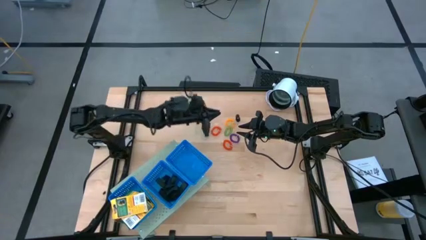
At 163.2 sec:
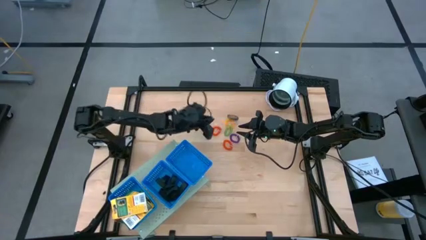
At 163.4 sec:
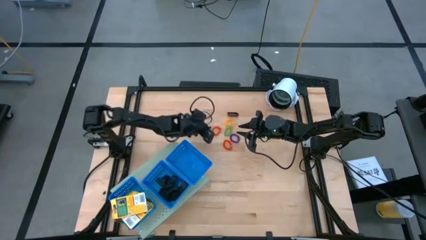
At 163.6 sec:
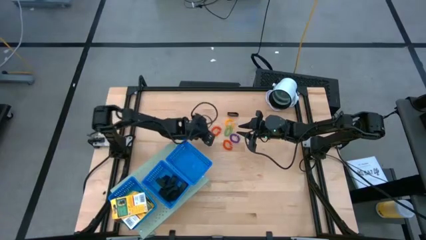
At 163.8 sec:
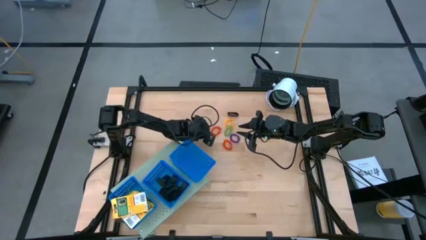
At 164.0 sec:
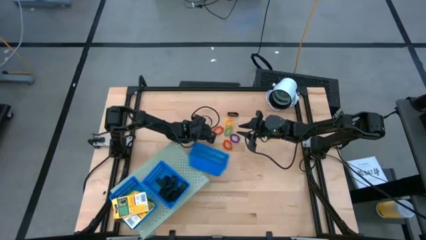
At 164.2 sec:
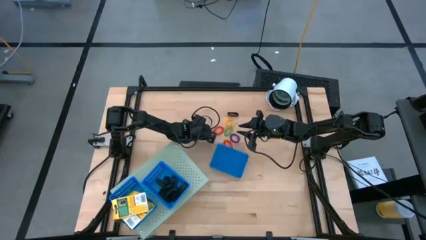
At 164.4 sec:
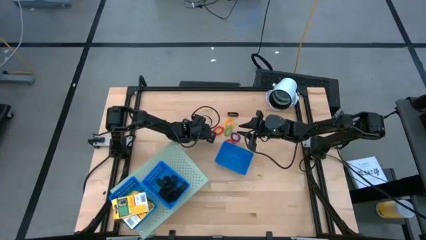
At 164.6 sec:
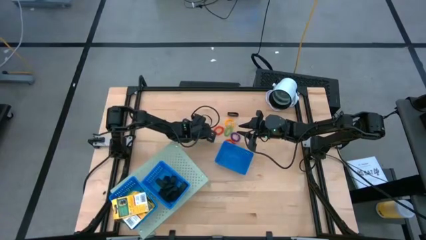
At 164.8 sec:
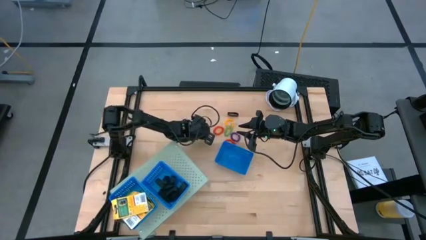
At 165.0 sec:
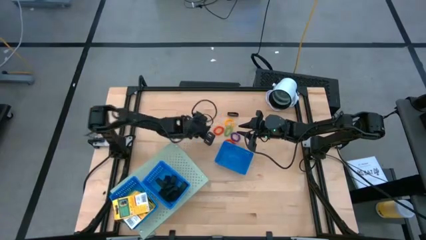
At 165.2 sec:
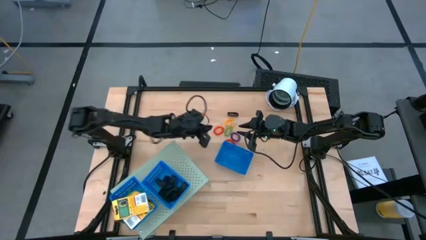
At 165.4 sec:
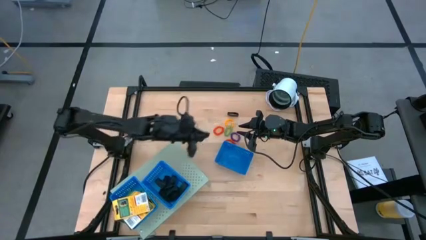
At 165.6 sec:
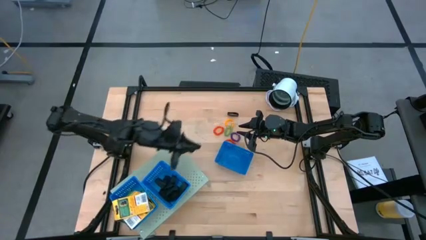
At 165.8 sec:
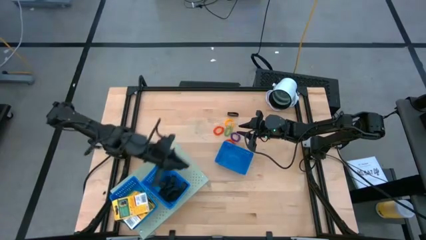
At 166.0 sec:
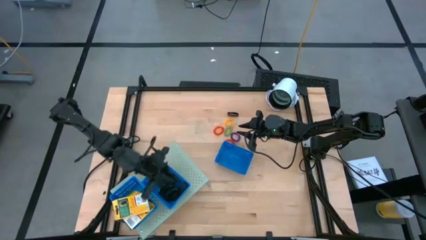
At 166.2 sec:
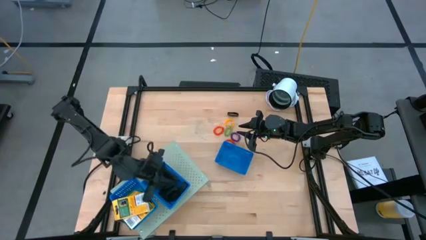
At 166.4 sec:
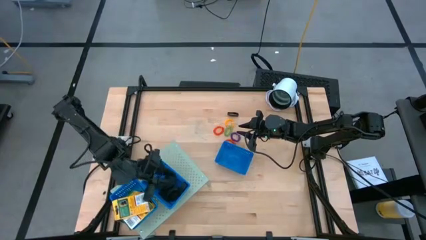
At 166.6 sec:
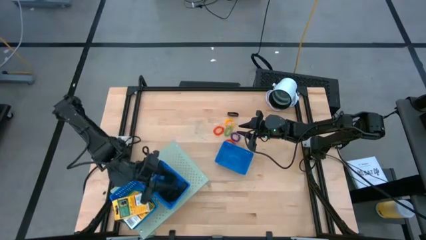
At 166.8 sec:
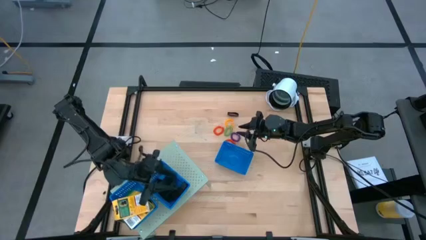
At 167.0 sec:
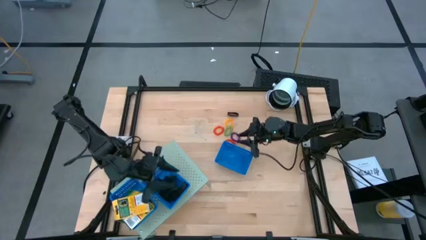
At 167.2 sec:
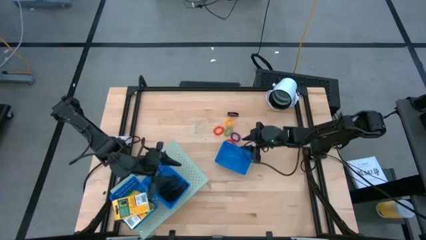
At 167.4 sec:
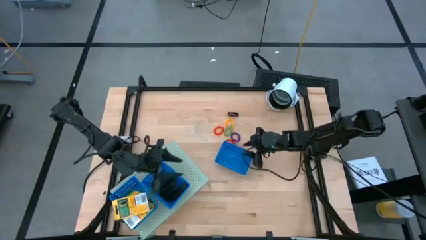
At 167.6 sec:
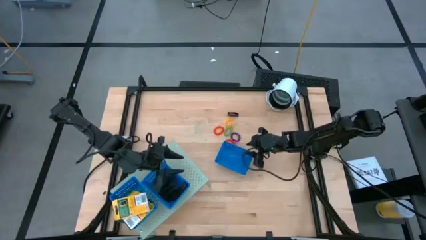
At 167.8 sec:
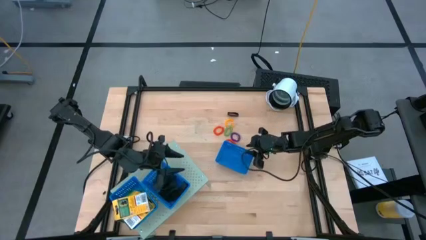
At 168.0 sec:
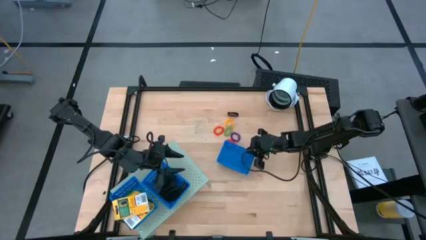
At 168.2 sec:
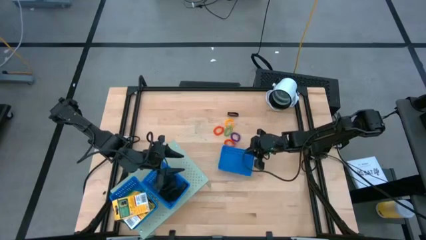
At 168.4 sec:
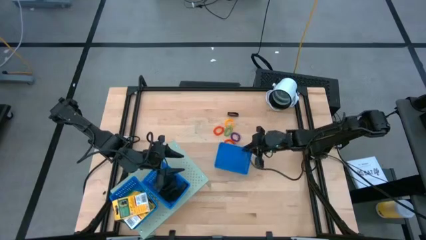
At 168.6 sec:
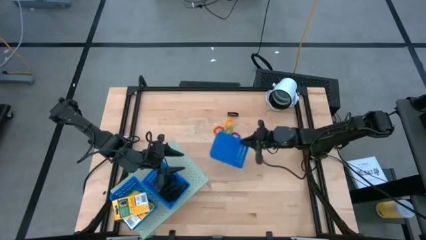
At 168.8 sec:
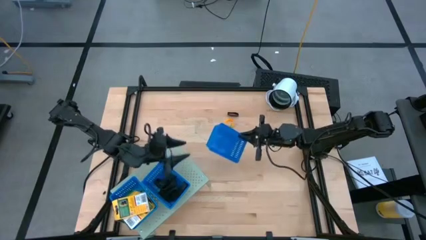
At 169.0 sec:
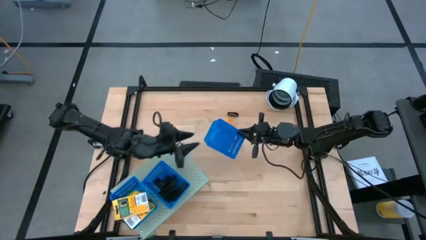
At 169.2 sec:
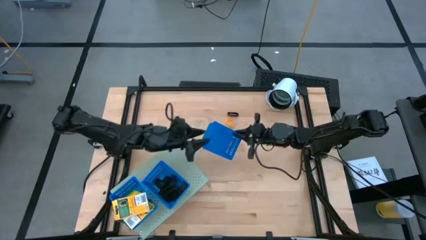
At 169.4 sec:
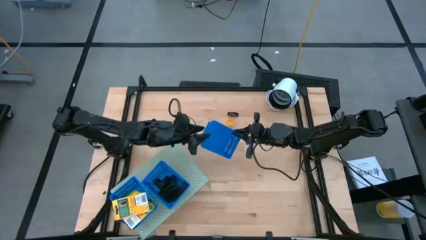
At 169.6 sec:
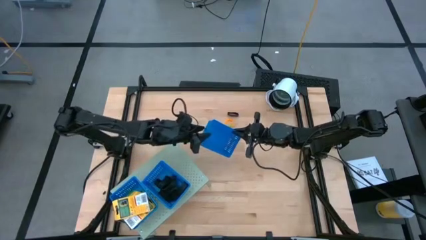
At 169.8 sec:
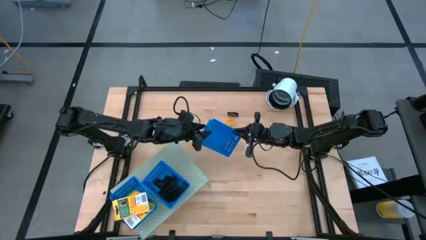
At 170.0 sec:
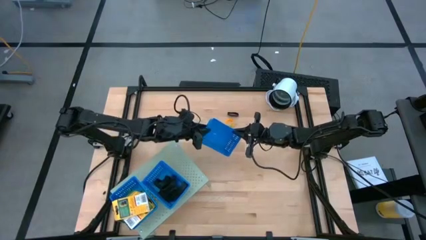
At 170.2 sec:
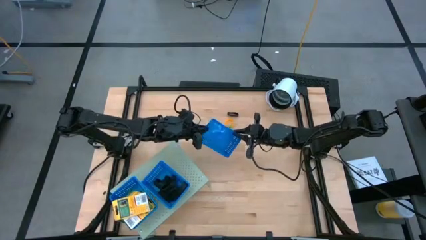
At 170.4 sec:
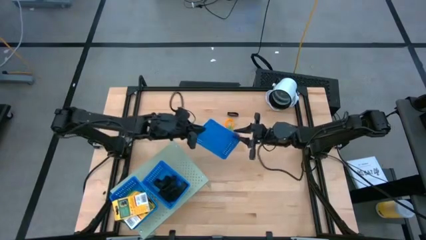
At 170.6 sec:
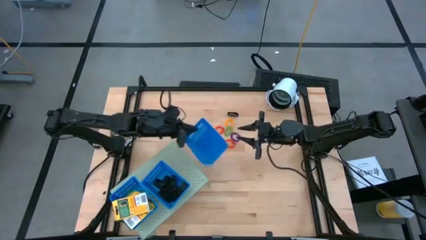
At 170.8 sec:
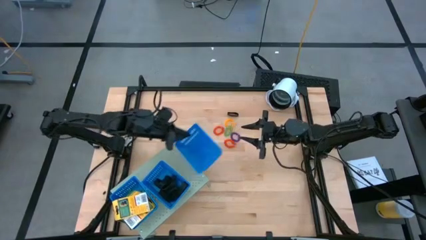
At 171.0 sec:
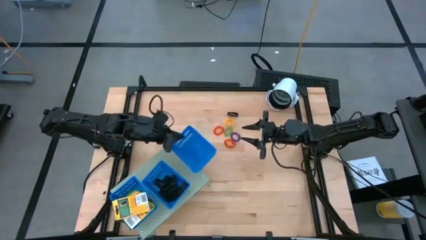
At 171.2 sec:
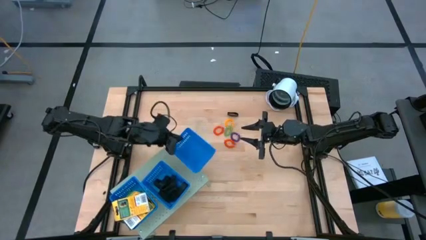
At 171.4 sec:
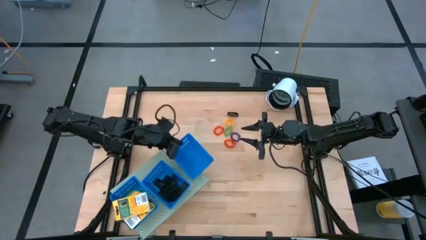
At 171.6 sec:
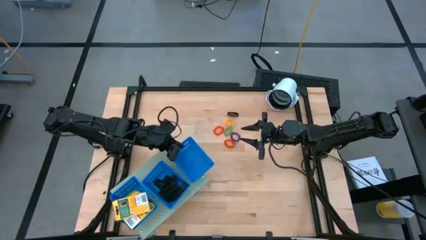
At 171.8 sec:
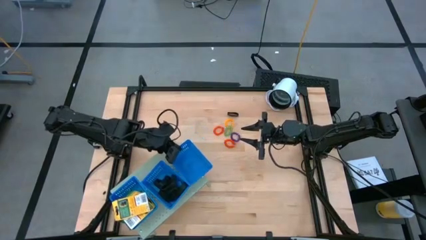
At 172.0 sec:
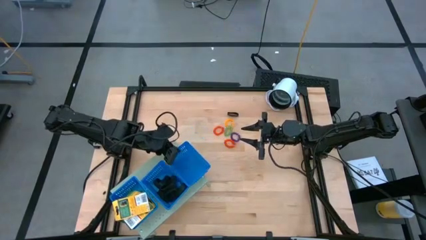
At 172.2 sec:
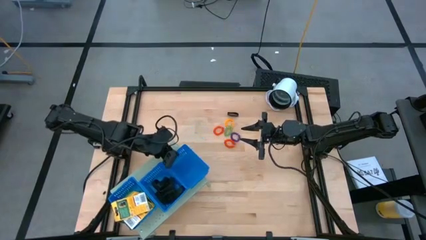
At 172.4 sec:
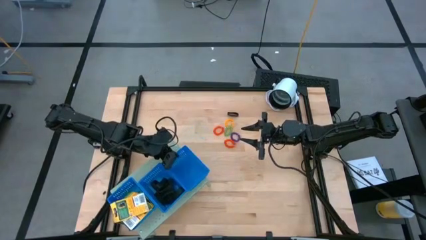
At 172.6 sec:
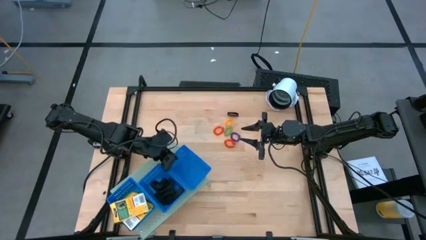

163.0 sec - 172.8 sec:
Task: Pick & Place Office Desk Supplies
Put the blue basket on the shelf

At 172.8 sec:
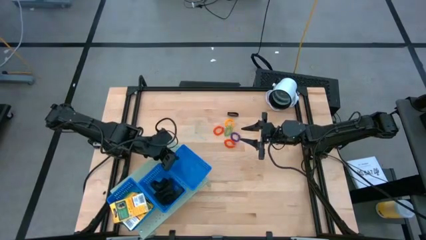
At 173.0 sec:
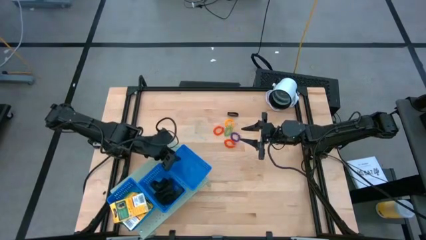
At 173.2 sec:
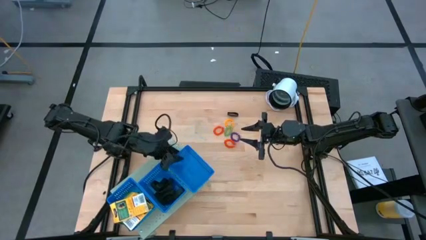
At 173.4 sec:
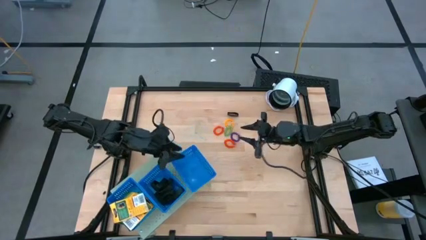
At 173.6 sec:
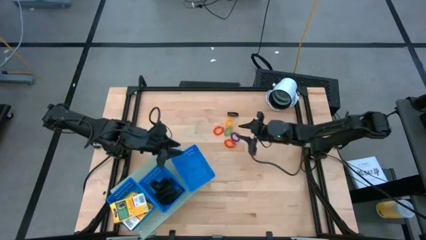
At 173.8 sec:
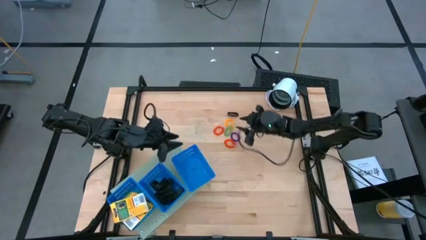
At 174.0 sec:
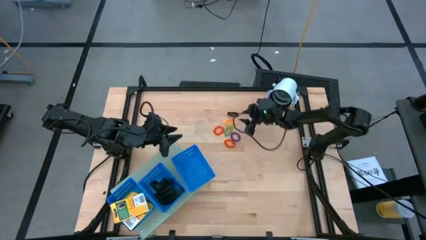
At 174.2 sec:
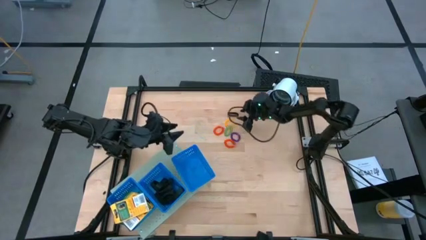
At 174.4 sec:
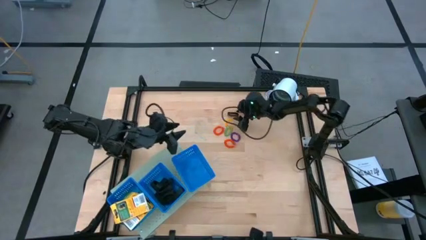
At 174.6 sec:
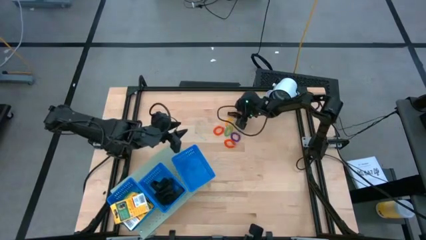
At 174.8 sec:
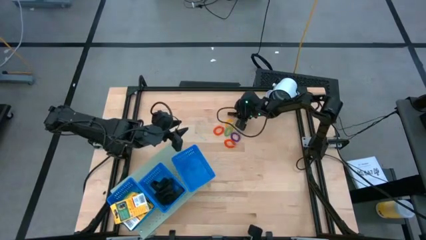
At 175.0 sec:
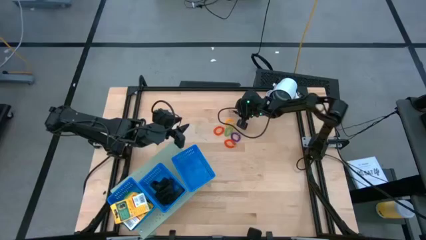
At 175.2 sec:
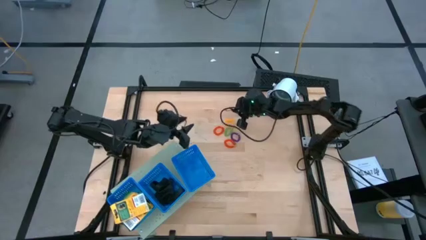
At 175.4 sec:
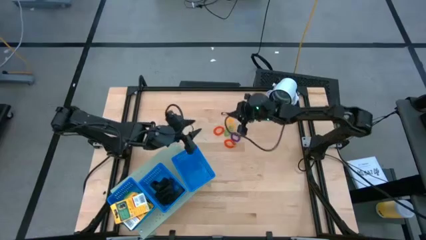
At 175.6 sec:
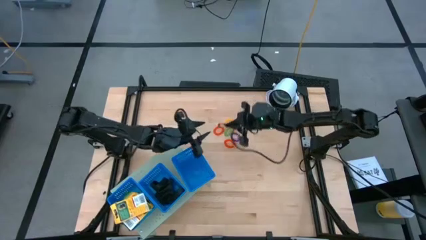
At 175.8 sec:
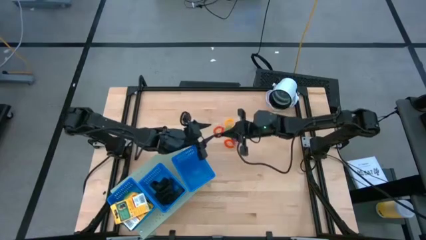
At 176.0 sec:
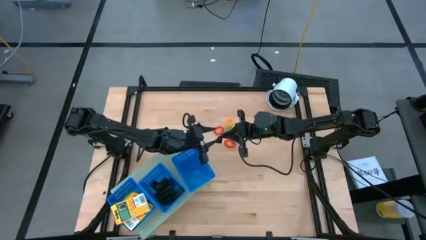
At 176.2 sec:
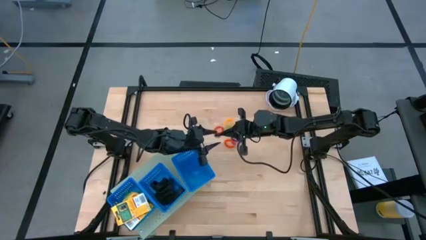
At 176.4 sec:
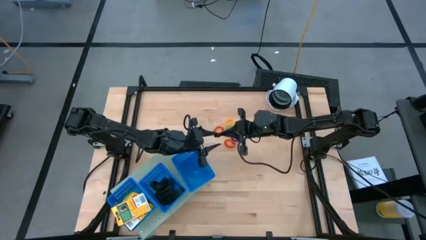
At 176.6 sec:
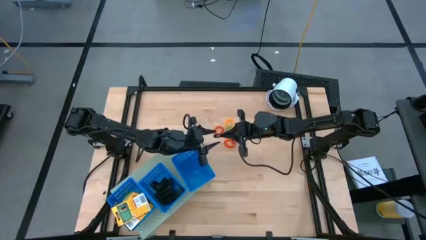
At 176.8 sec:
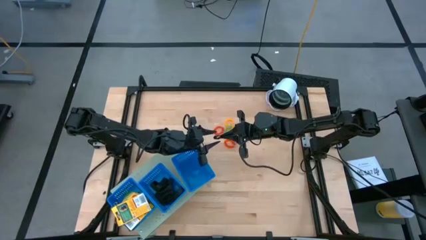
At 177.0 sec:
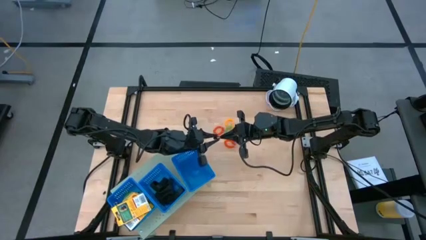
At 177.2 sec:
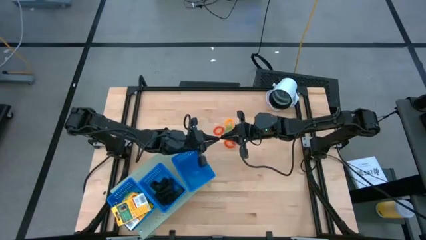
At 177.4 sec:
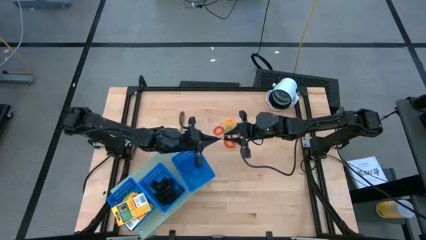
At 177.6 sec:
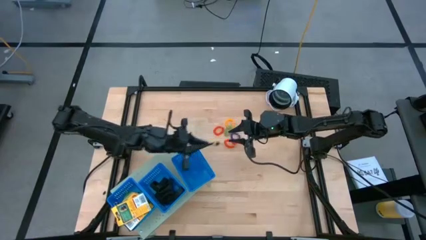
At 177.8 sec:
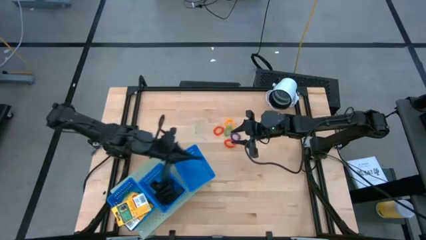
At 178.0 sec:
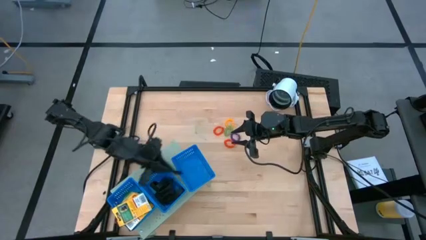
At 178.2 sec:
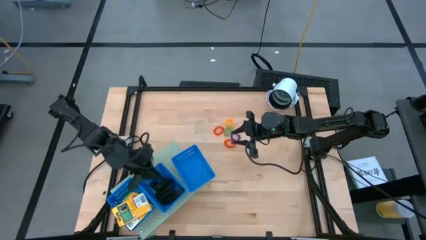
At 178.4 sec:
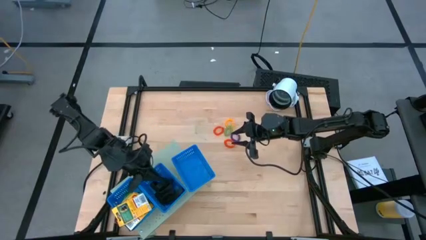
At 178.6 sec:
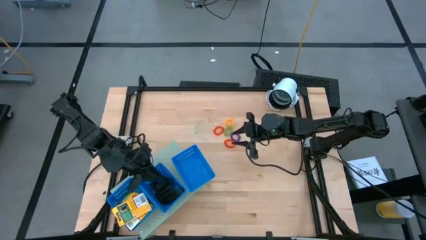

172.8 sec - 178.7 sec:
Put the black rubber band into the center blue basket on the shelf
